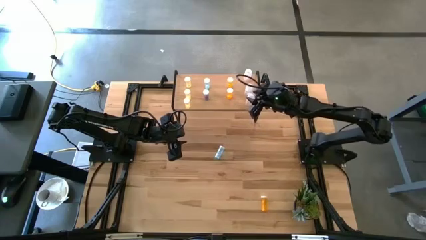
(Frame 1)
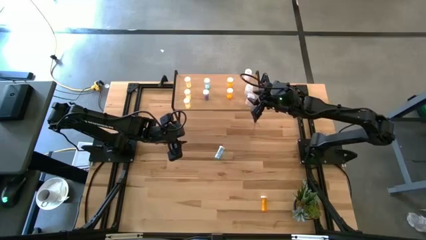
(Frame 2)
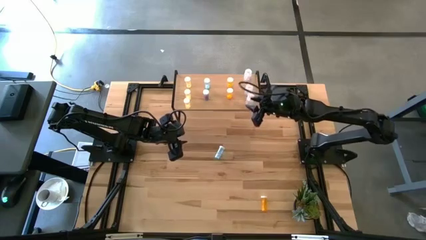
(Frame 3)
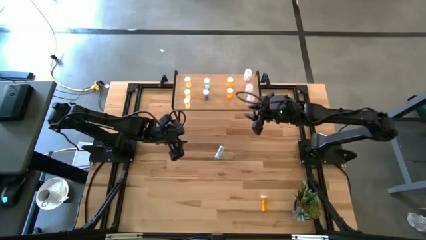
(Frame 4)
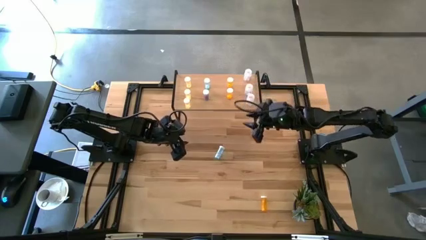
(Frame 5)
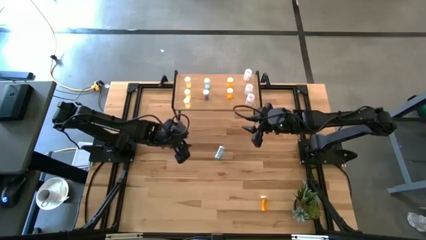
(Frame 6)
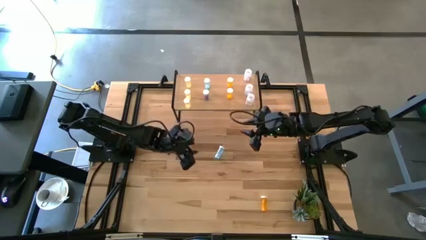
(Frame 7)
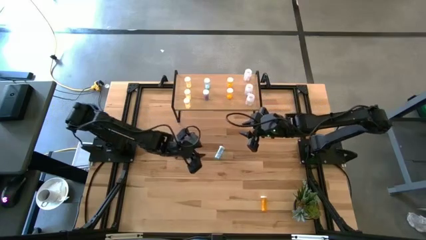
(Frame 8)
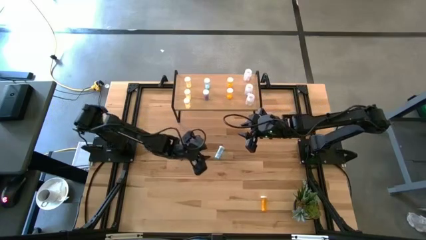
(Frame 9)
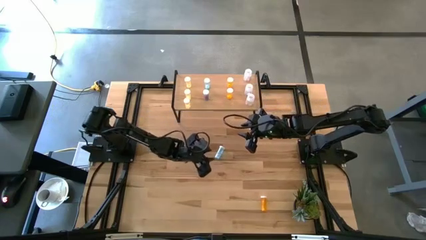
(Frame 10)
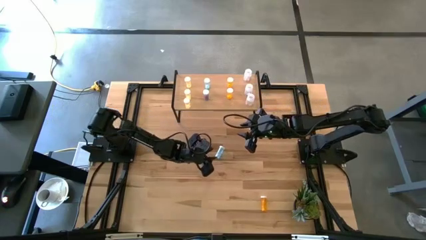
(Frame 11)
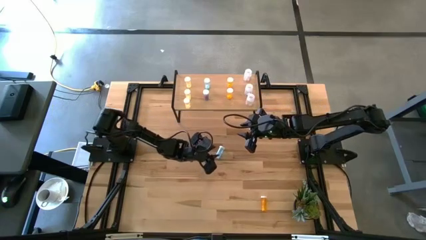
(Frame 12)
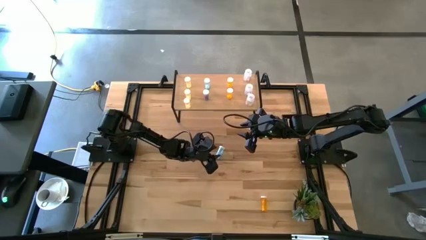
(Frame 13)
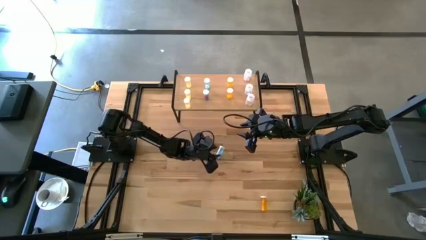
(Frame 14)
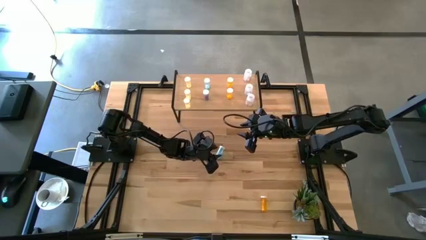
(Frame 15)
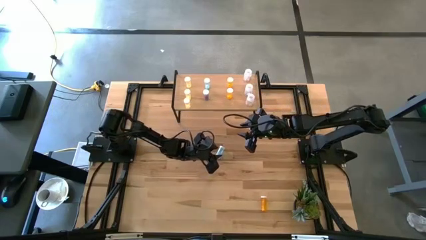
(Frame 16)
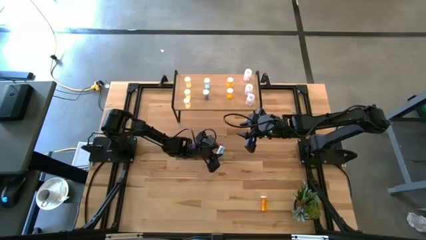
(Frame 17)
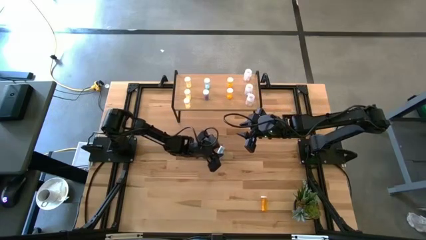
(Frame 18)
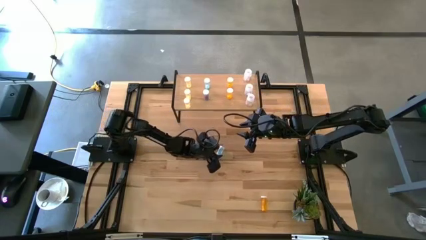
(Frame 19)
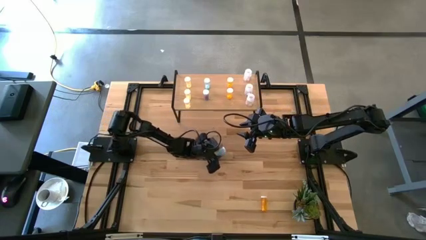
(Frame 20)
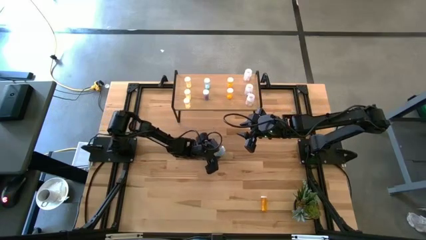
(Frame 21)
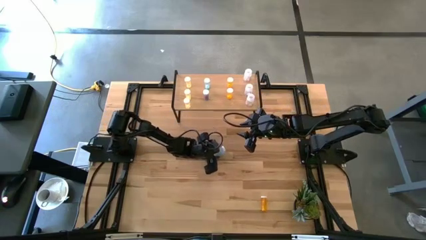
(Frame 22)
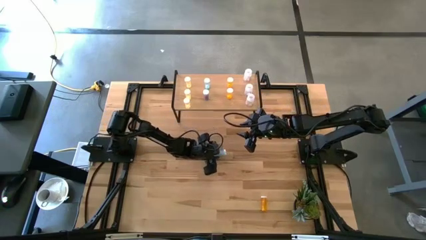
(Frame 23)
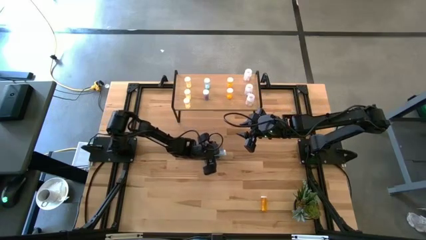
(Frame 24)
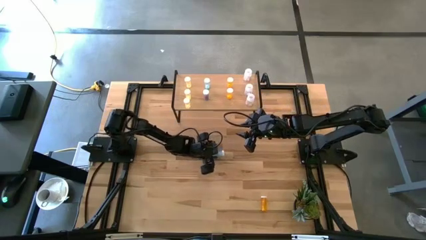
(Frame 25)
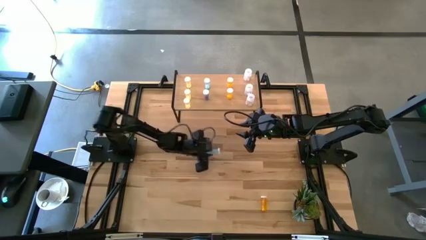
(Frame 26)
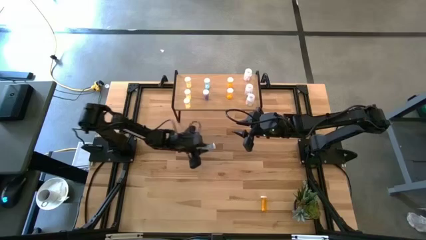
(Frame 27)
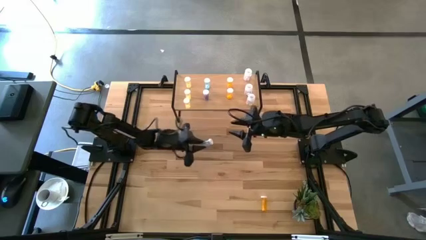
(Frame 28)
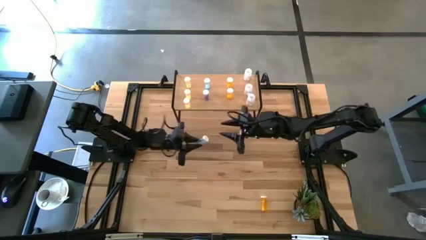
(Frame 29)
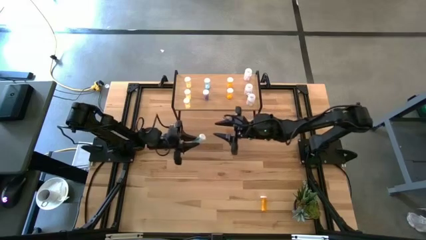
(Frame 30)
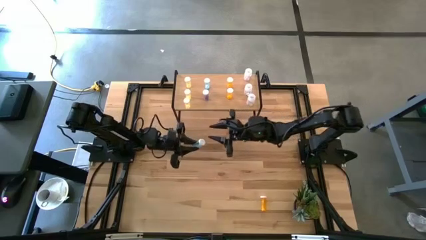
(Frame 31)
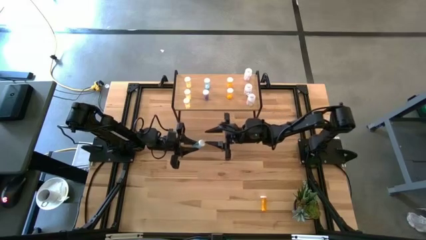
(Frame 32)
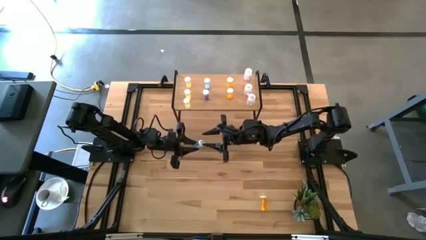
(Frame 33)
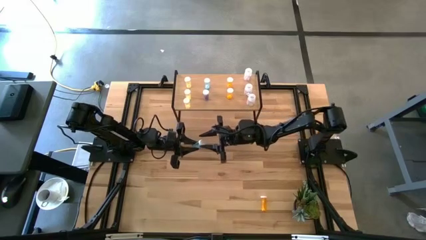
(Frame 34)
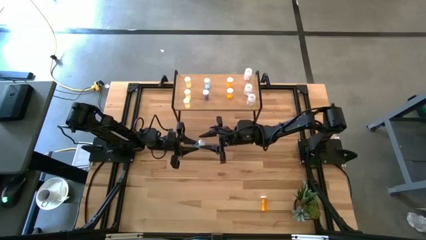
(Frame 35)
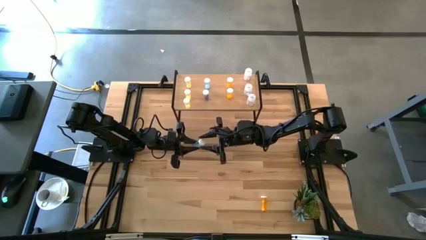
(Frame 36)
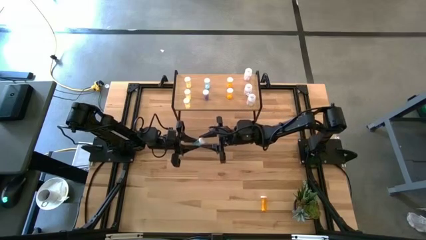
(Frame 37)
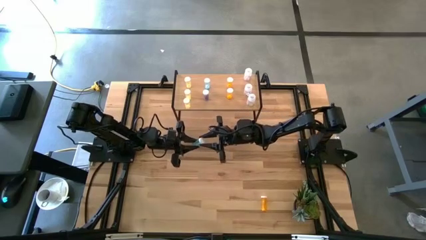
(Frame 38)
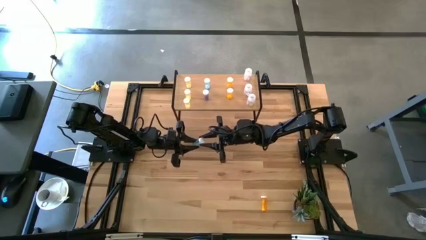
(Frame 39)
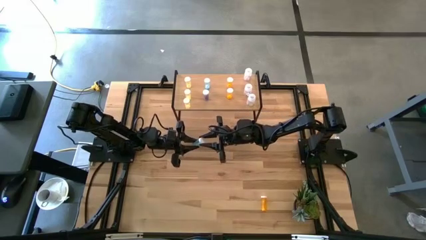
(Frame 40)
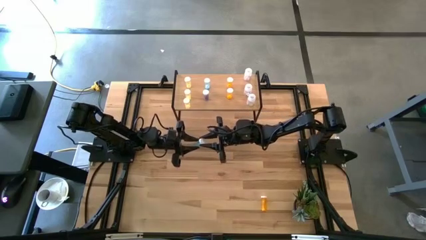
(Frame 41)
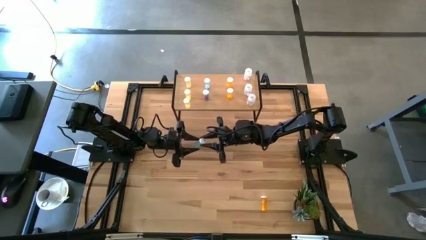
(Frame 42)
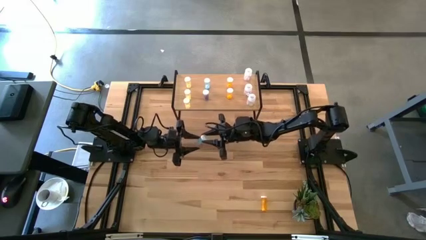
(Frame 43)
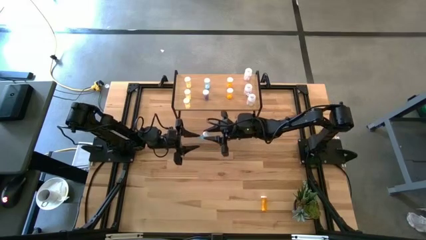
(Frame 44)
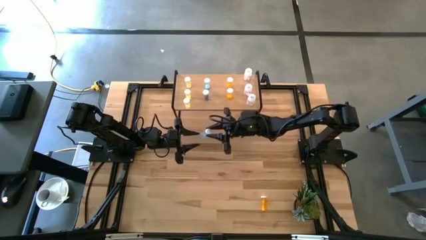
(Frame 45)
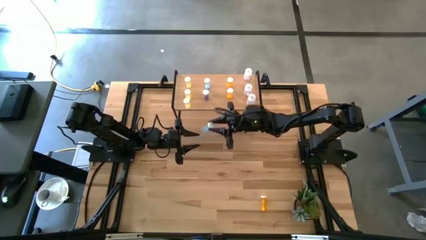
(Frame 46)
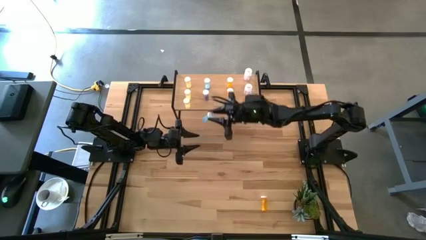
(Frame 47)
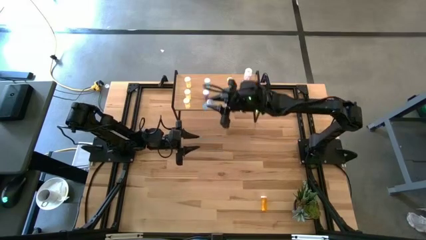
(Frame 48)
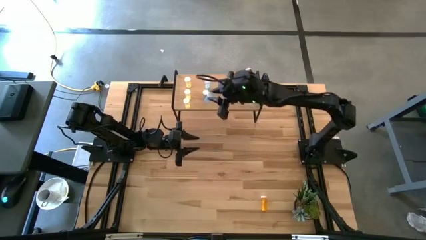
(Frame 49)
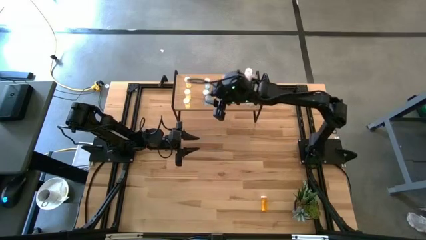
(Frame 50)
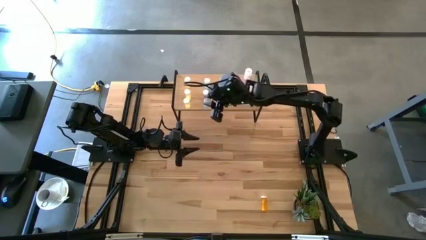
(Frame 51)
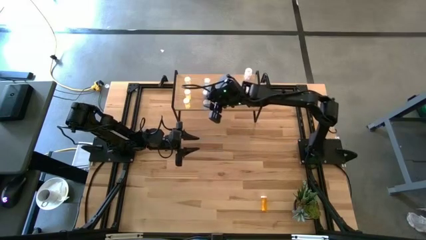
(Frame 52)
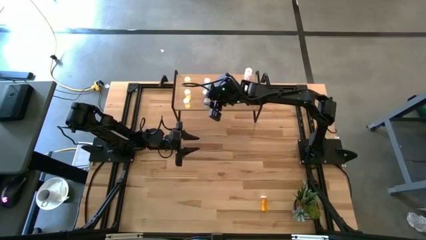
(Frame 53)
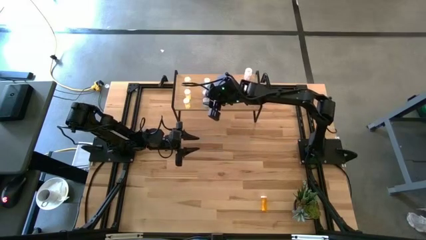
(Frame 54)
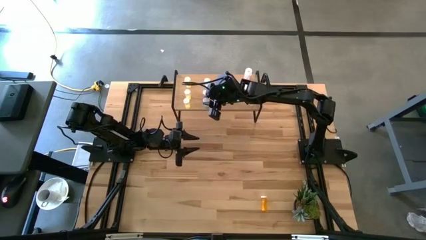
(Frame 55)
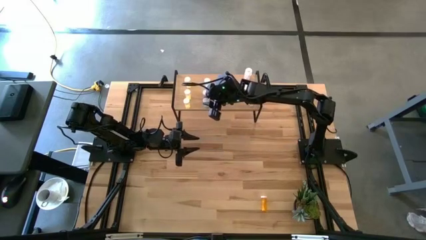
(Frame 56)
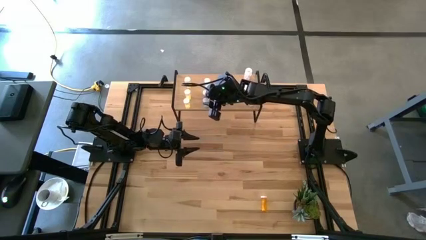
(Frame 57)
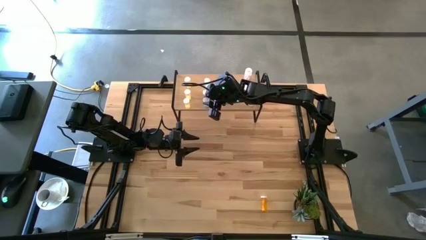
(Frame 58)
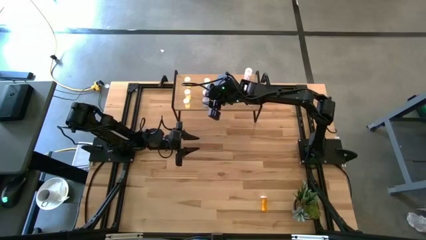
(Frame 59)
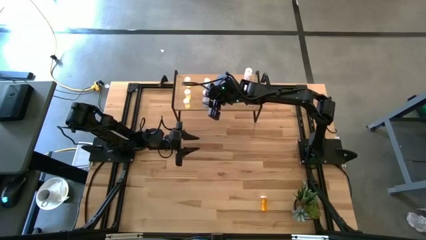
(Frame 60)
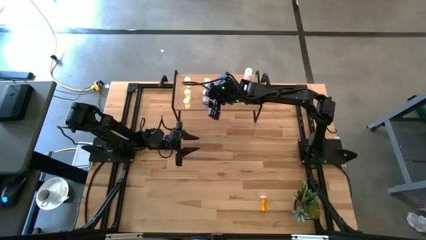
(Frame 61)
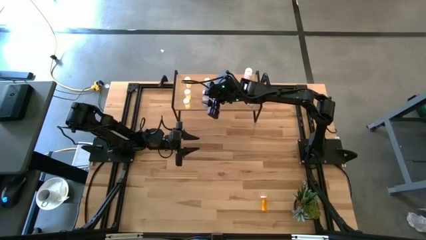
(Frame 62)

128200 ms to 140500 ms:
Task: Pick and place medicine bottles onto shelf by color
Put the blue pill bottle on the shelf aligned with the other blue pill bottles

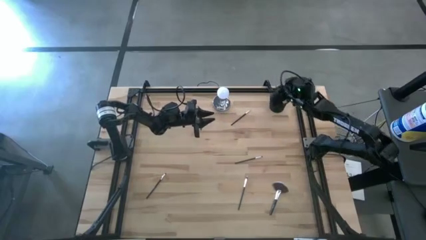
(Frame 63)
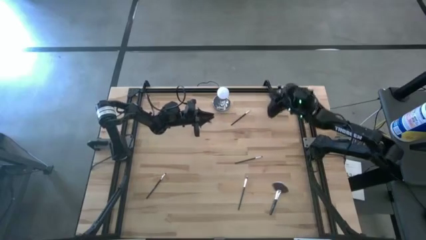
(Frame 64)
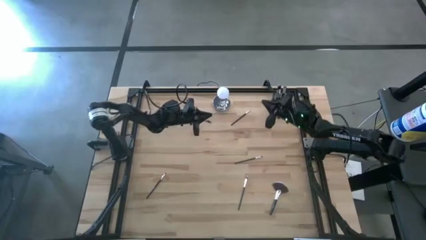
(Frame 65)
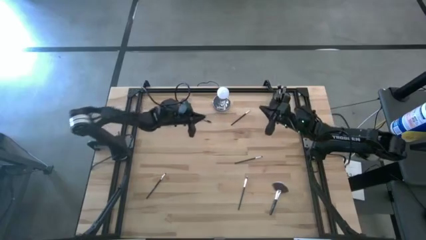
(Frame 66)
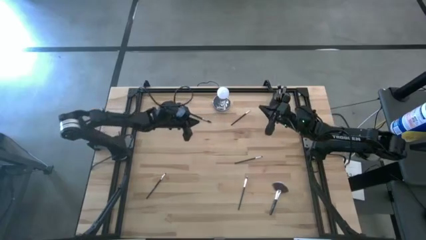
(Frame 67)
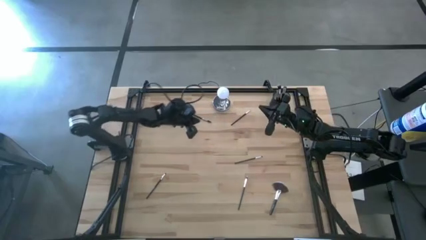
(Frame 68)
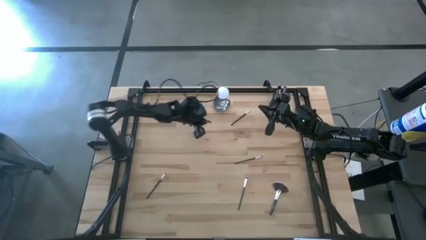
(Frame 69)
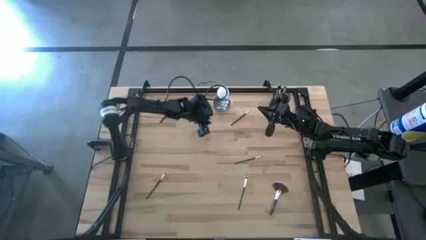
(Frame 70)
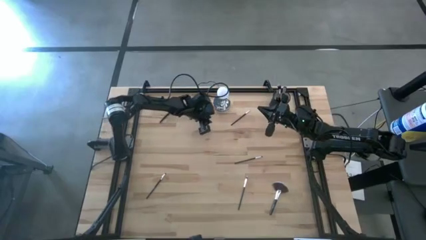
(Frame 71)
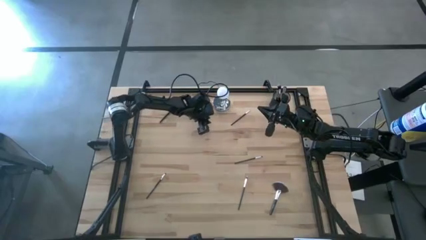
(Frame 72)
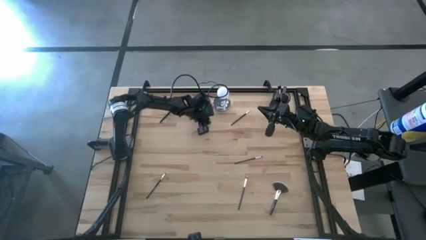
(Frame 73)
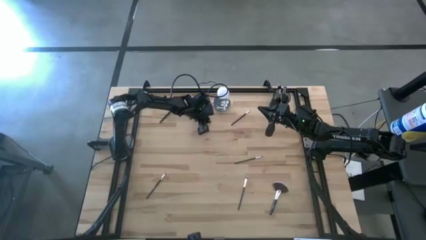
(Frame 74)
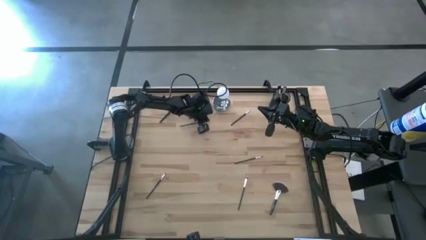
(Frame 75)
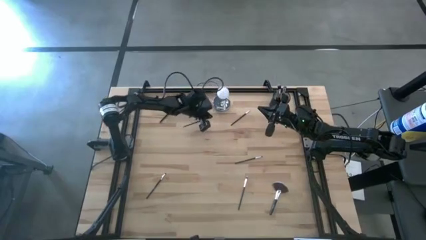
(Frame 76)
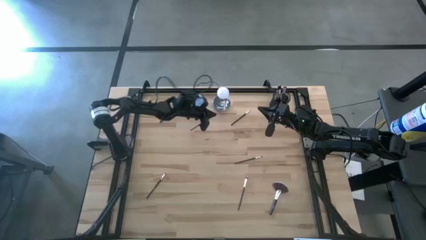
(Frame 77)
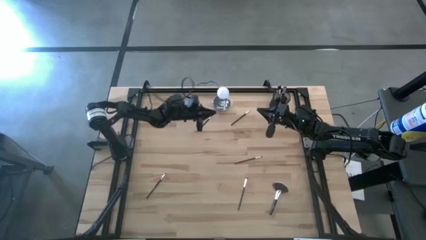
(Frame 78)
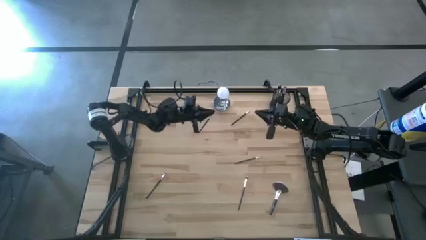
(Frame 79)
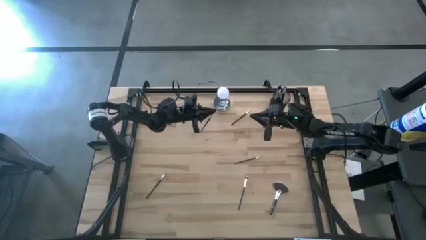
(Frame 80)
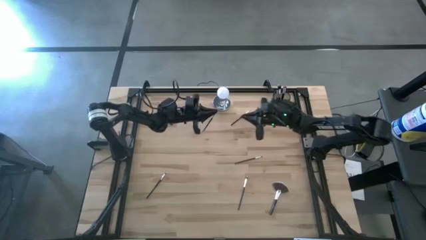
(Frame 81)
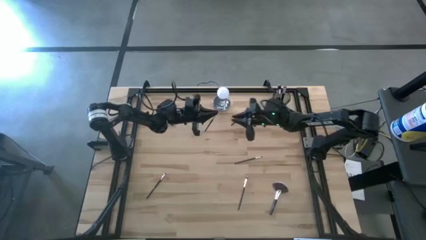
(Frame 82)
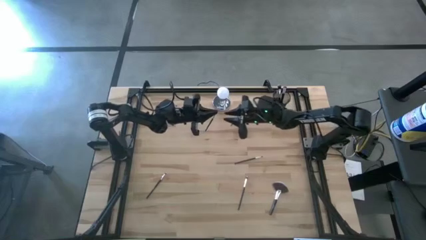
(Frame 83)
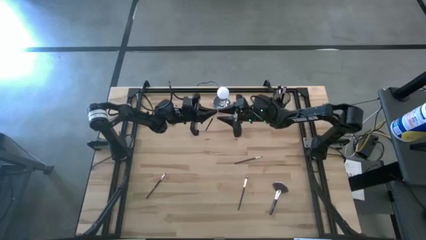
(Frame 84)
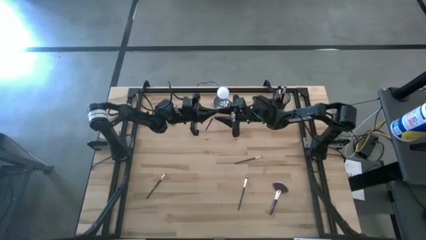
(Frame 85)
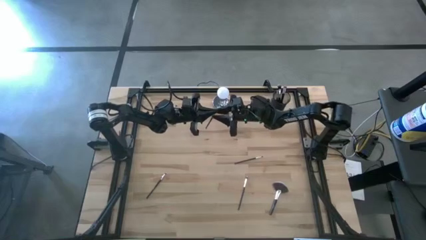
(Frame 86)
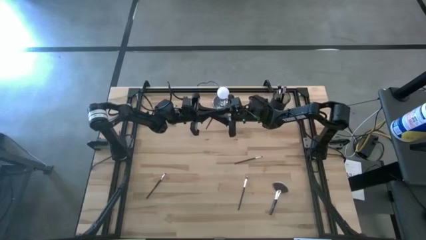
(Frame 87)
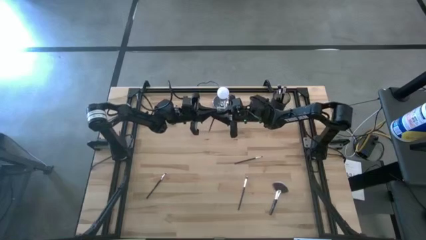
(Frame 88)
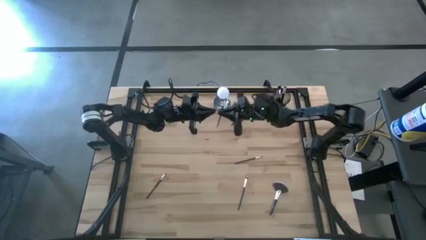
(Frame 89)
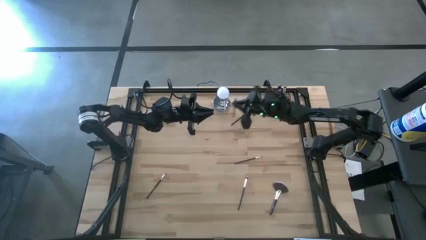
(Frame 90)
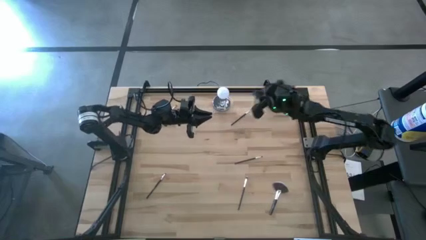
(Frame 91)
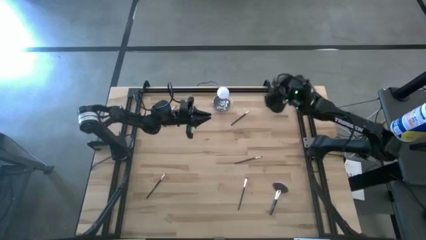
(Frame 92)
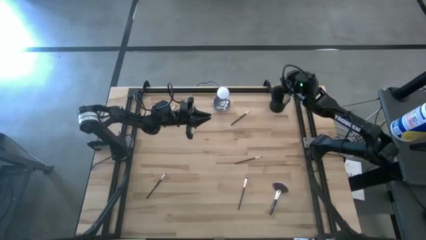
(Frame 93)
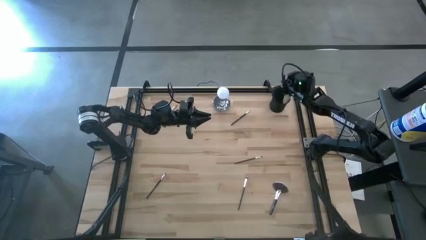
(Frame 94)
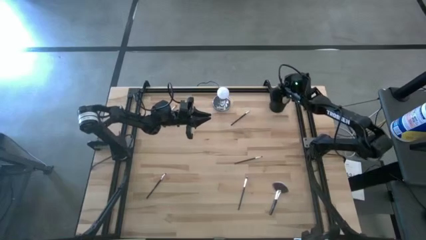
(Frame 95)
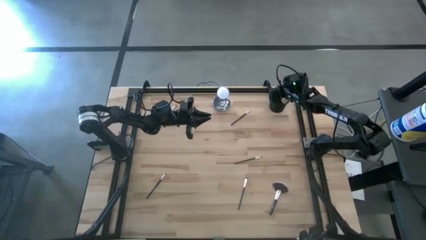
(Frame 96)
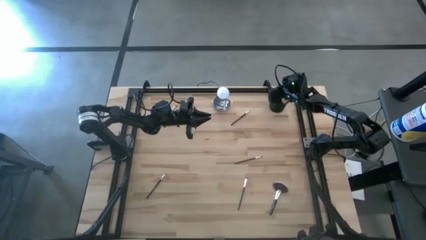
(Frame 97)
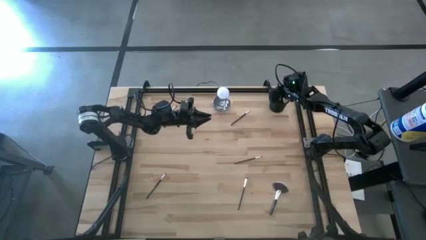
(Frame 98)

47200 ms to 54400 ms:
Task: Put items in baskets/containers
Put the black lash brush into the black pen holder
